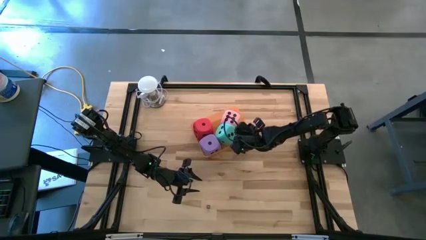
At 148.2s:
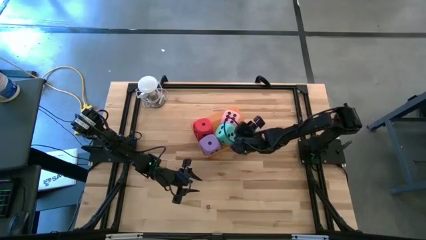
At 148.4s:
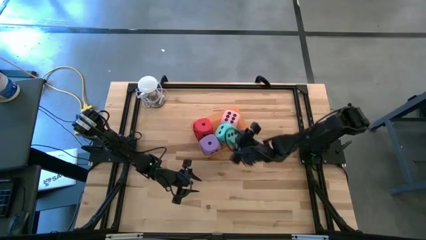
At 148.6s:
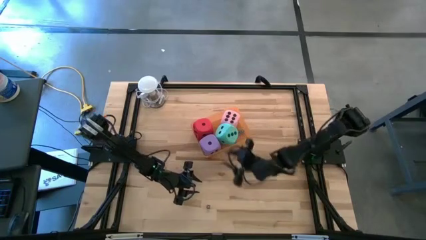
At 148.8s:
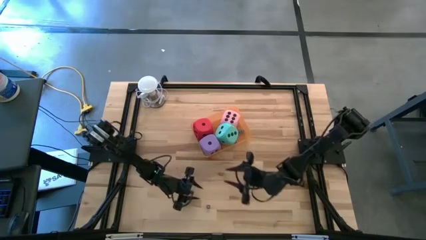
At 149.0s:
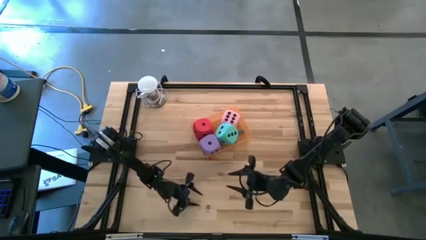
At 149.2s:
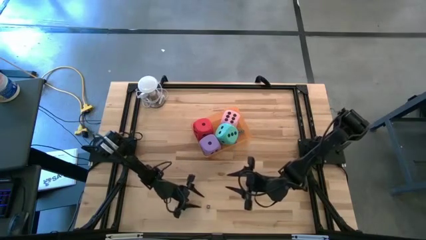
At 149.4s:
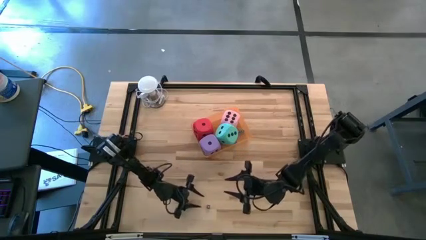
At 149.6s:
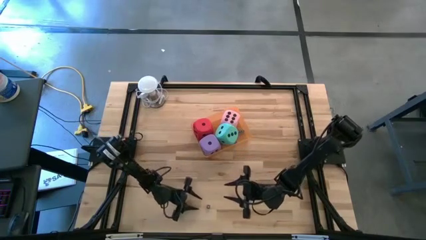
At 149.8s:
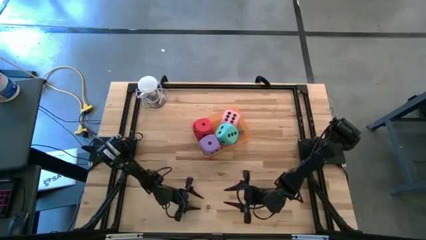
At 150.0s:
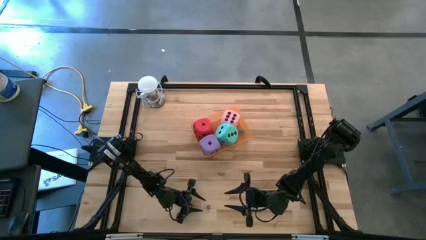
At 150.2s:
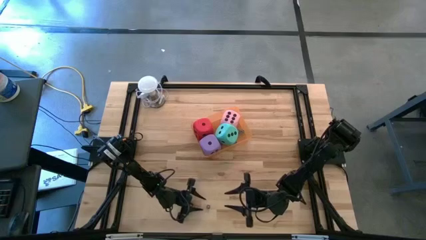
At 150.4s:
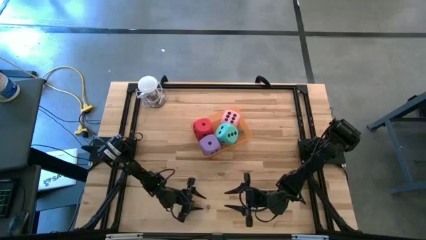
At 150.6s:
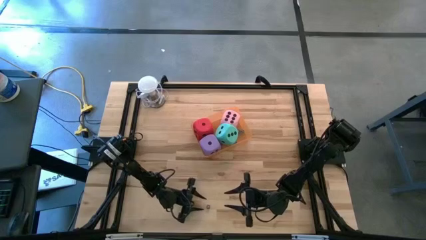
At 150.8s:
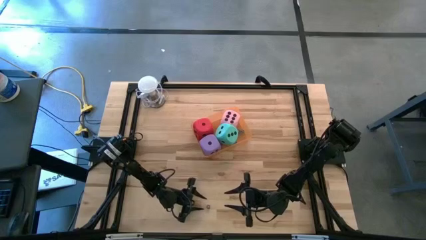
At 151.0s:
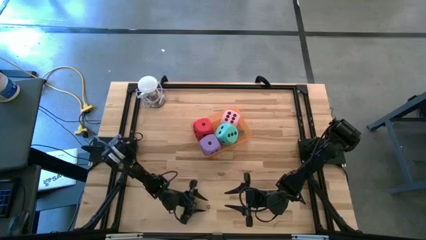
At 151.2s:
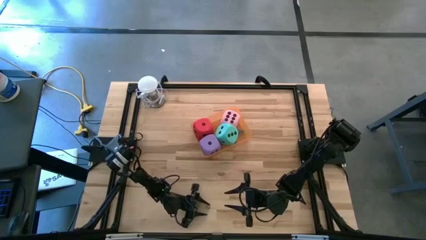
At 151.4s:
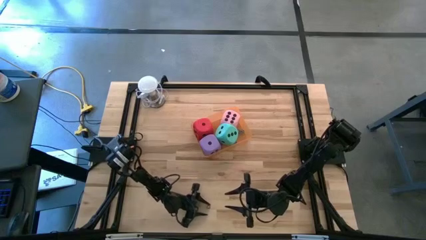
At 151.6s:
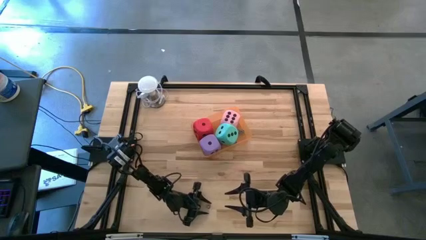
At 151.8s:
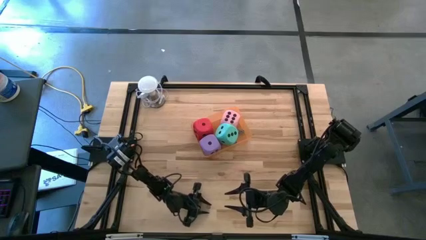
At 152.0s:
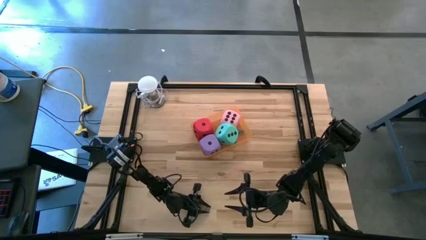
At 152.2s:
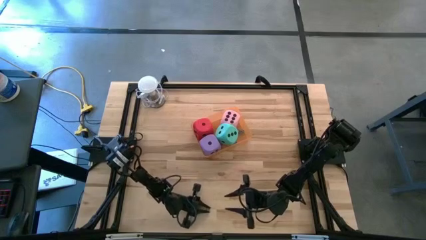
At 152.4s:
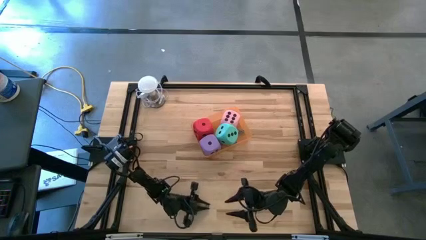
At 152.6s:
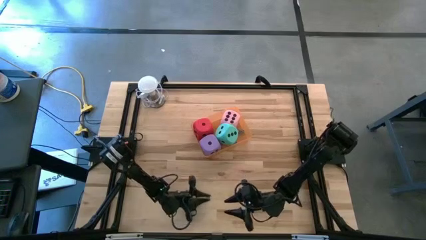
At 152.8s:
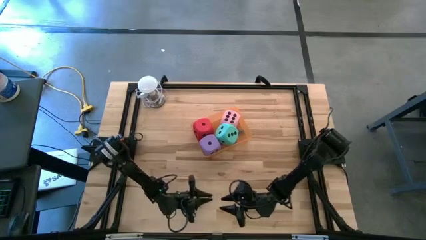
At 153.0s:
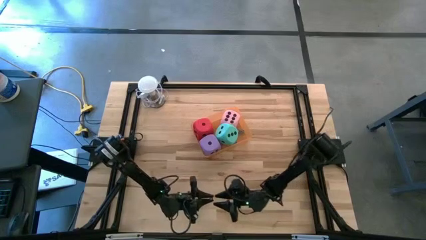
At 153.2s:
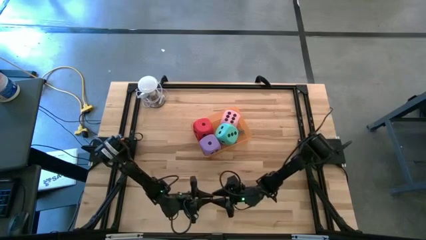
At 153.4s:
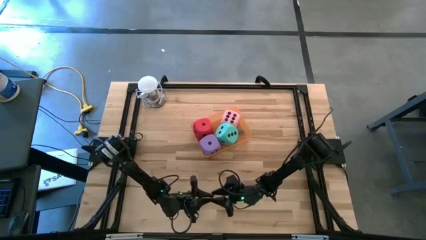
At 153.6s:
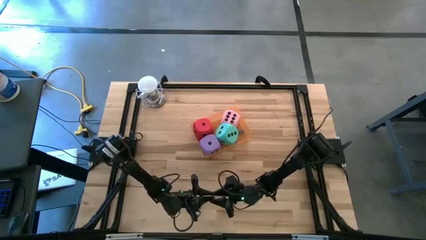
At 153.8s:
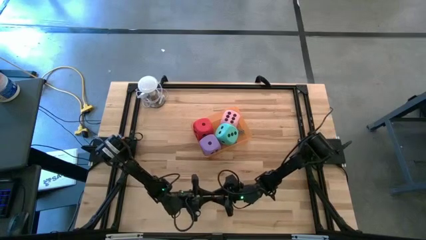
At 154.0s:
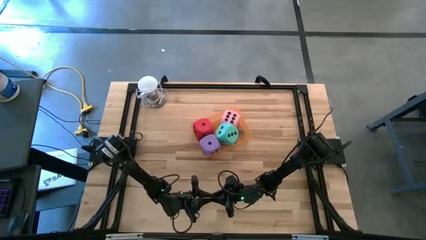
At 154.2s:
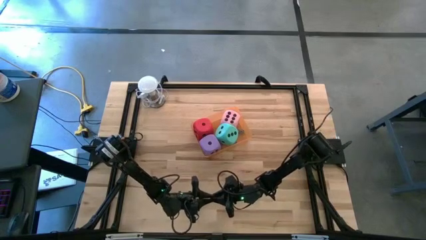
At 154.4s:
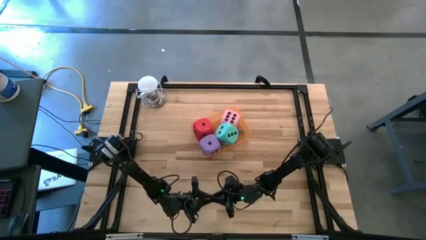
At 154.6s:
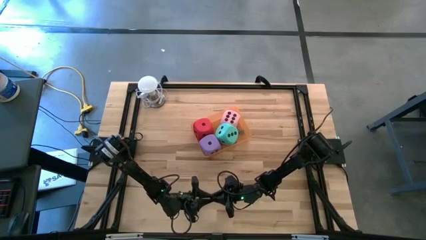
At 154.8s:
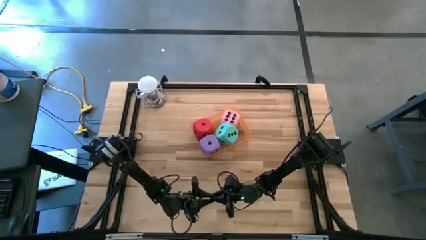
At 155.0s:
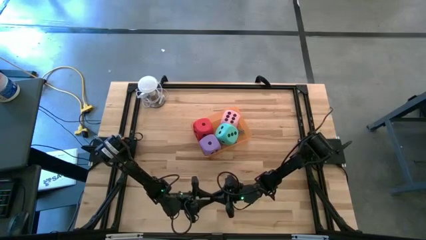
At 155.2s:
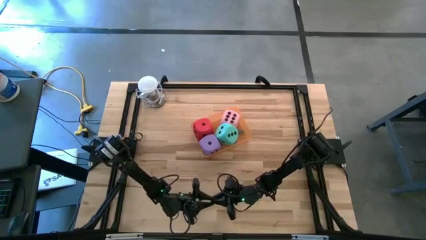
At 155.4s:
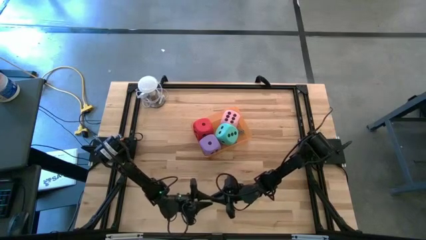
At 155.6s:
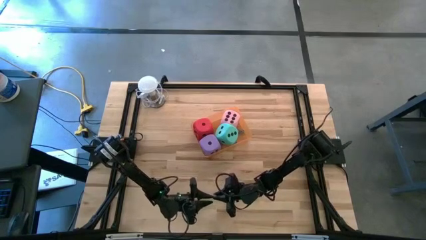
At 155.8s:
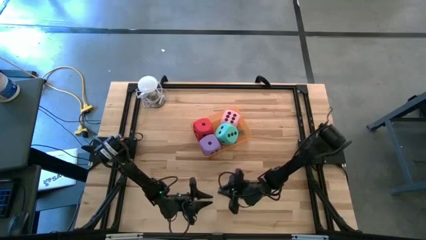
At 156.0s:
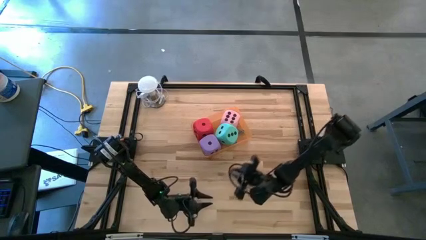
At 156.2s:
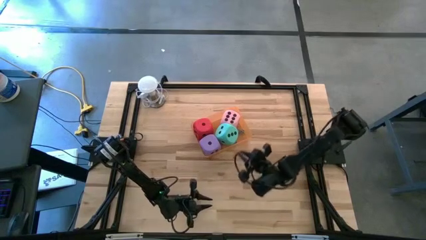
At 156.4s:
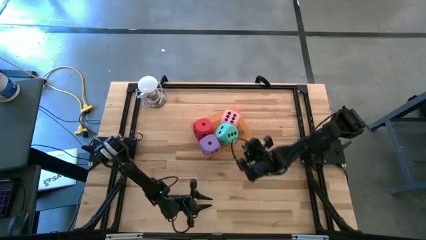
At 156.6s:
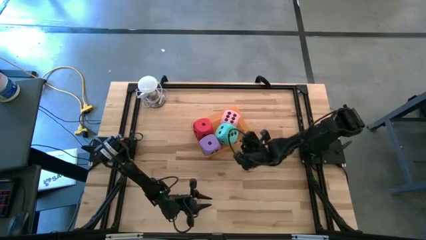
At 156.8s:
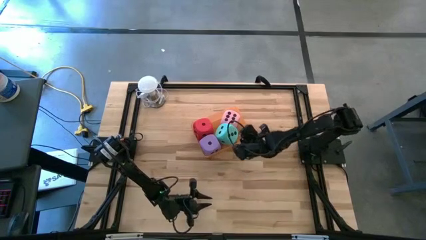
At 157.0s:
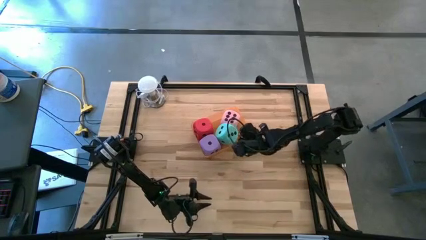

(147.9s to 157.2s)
Task: Pick & Place Dice
Put the small black dice into the orange bin

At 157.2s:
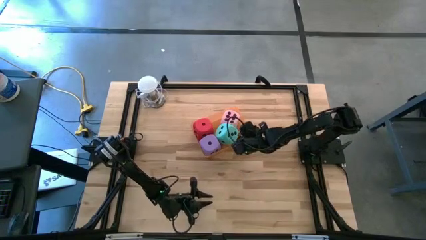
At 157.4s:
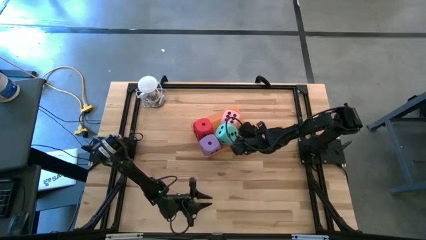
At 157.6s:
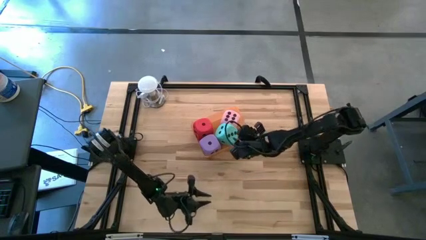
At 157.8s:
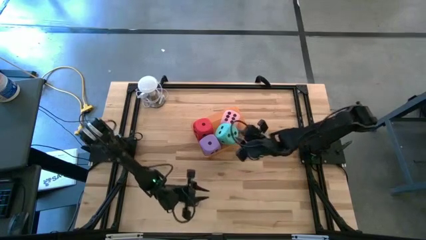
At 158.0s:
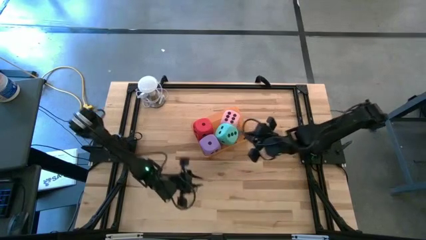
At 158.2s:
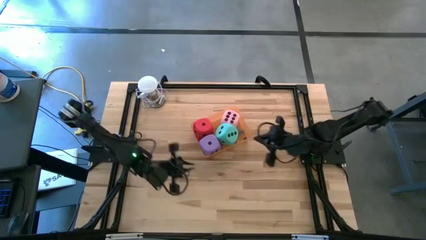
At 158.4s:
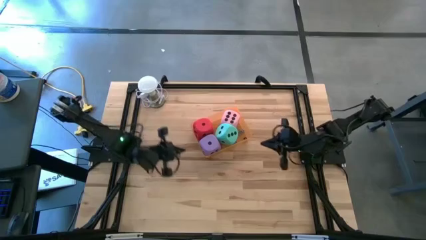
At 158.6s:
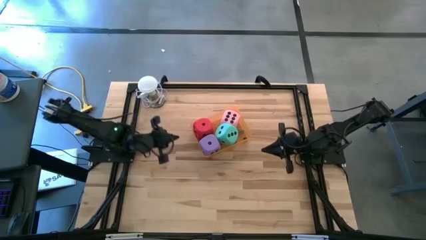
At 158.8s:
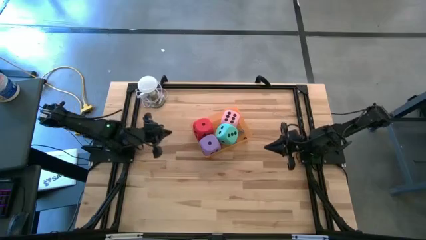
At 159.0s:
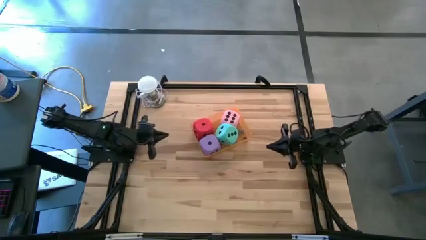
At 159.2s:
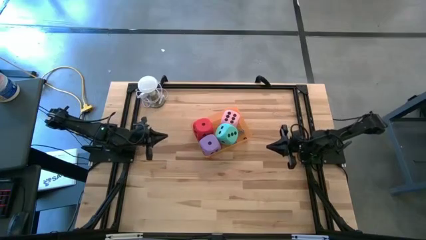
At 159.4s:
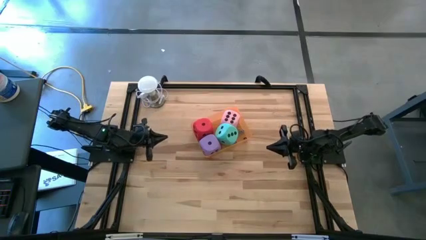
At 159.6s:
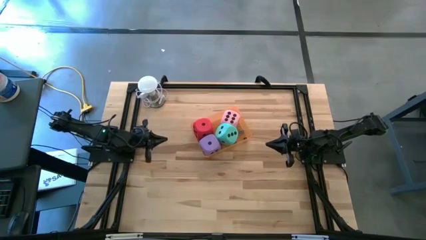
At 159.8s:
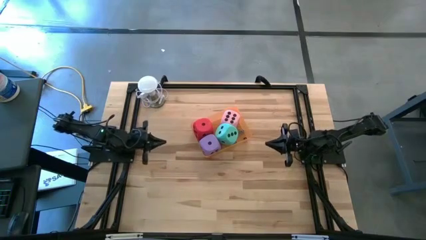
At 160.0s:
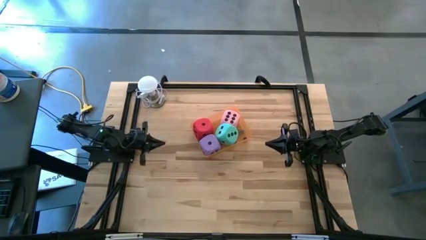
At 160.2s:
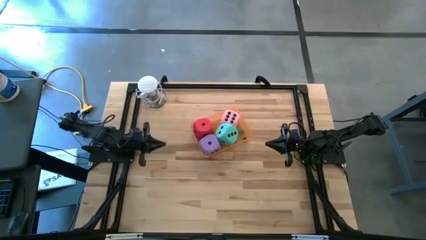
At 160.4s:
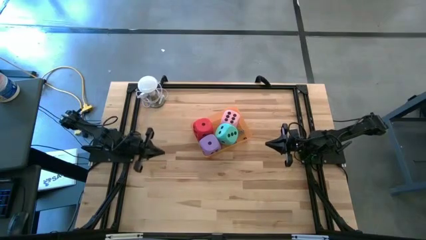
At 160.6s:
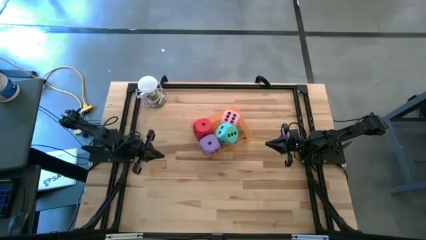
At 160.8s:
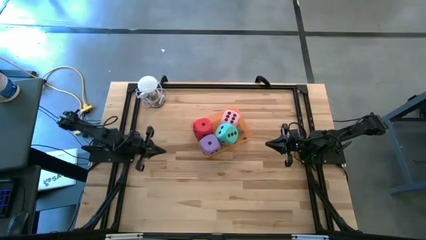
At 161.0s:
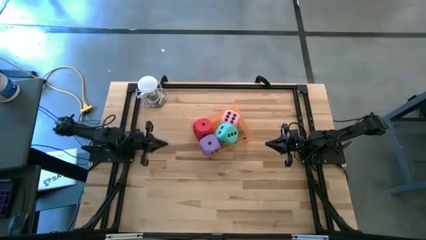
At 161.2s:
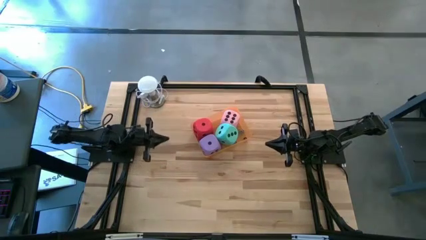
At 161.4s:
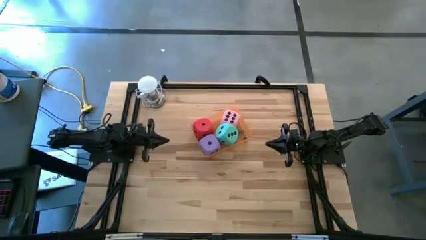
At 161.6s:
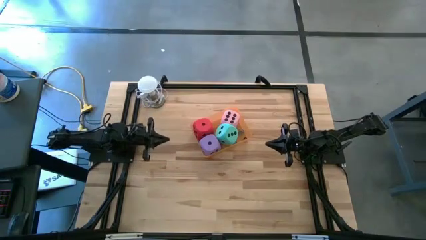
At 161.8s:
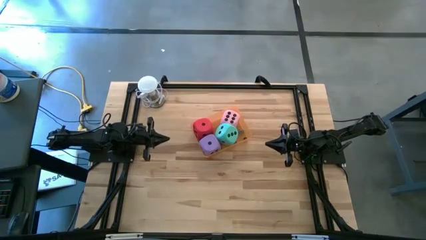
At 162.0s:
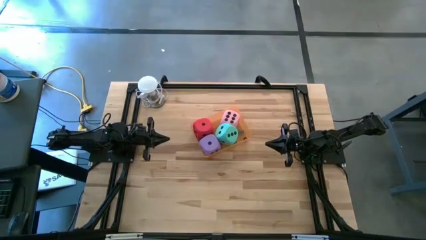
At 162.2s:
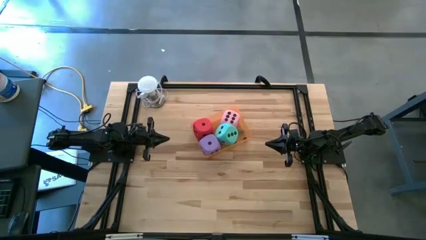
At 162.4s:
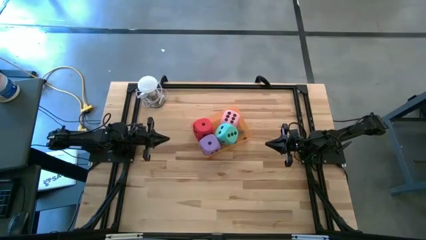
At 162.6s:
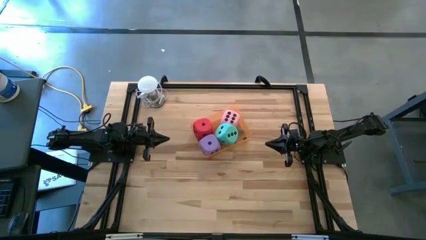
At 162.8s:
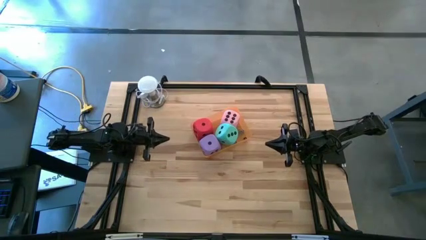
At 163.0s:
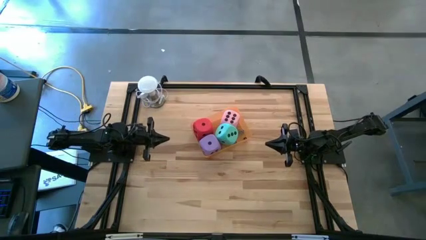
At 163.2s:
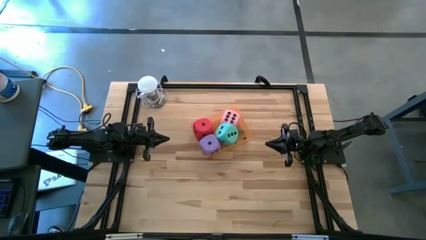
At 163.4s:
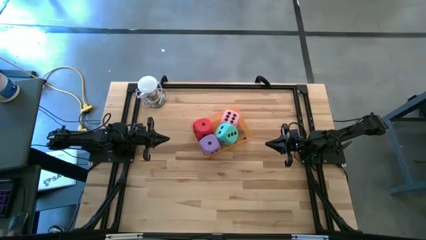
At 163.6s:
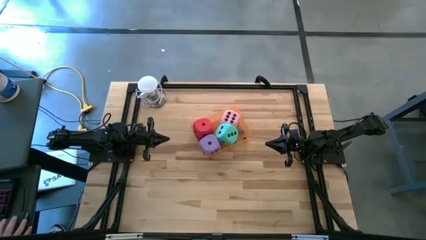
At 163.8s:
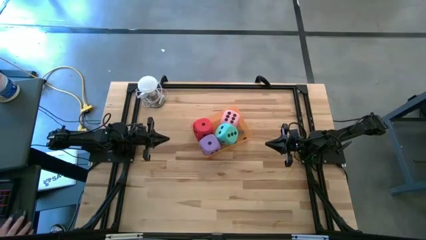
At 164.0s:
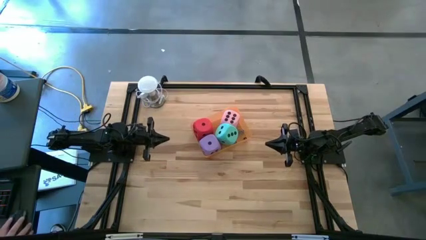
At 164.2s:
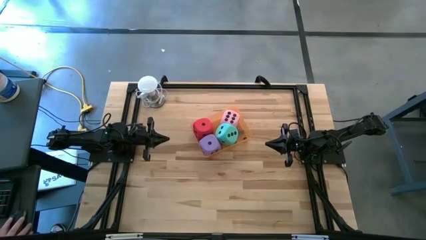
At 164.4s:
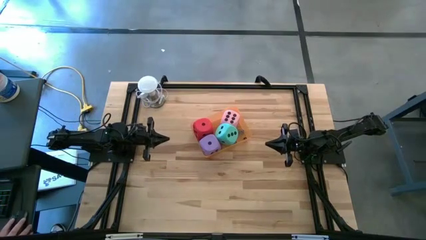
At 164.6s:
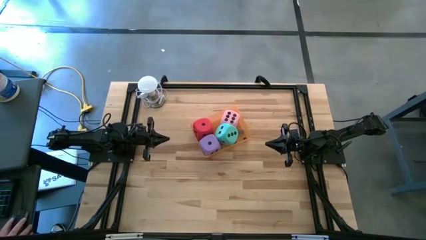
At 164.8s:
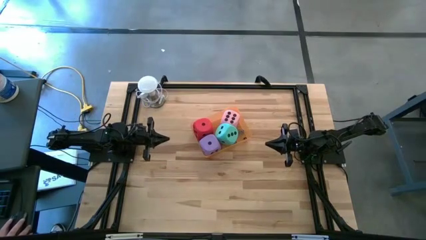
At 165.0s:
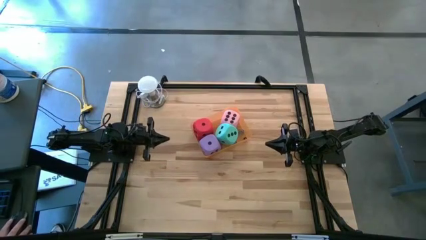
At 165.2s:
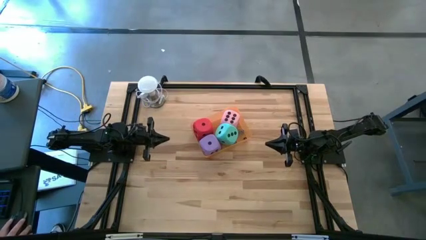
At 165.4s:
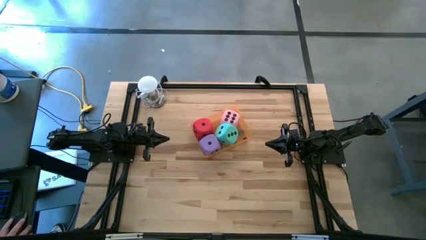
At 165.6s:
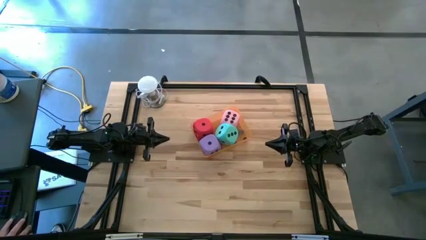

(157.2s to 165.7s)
Return to Home Position
